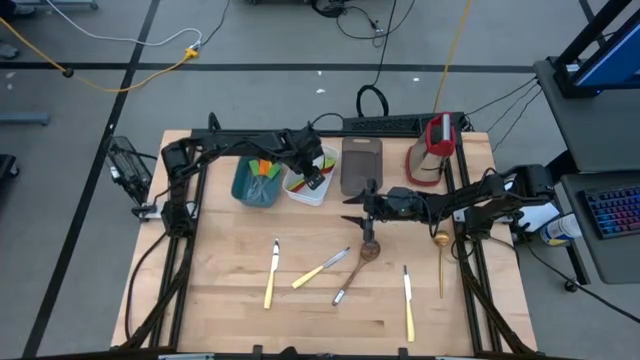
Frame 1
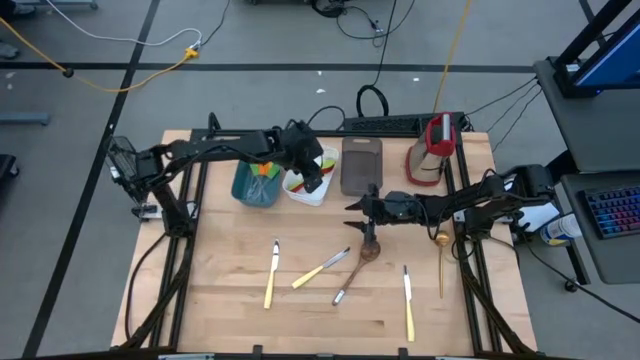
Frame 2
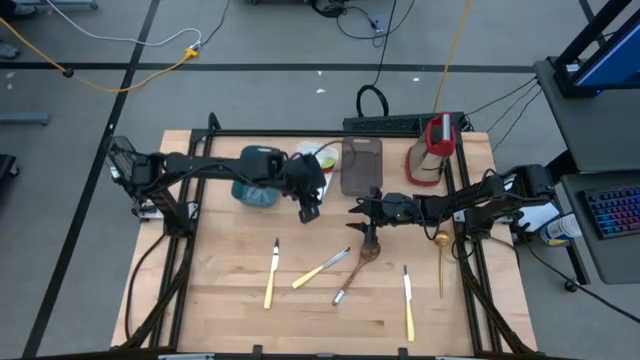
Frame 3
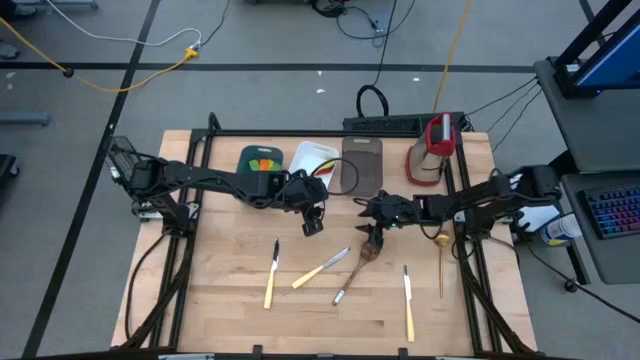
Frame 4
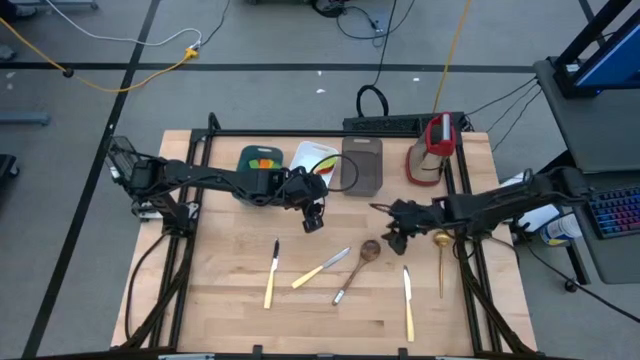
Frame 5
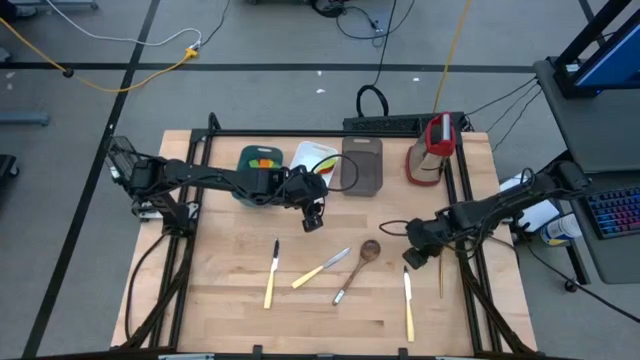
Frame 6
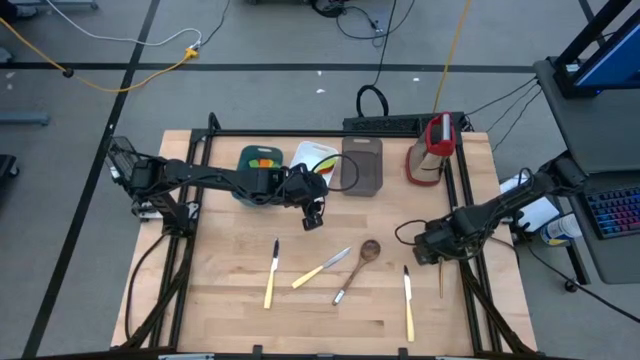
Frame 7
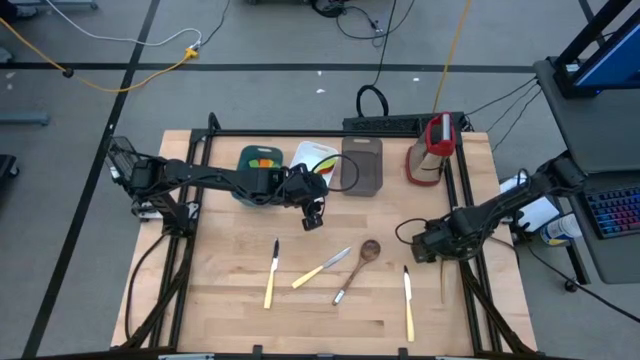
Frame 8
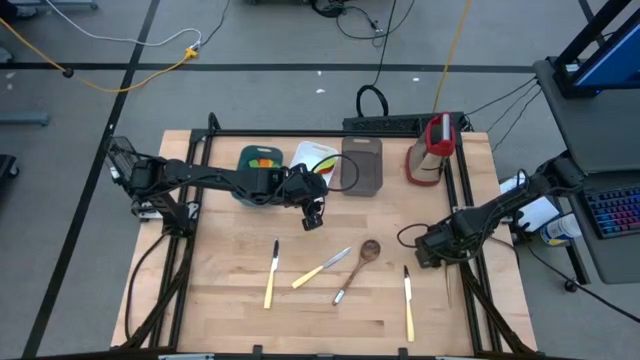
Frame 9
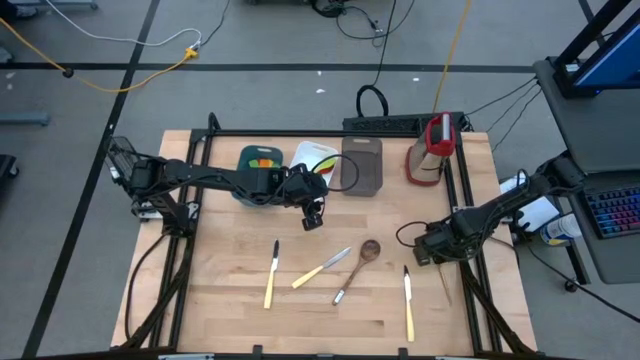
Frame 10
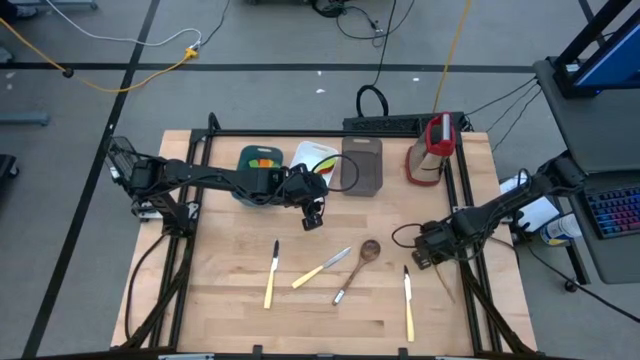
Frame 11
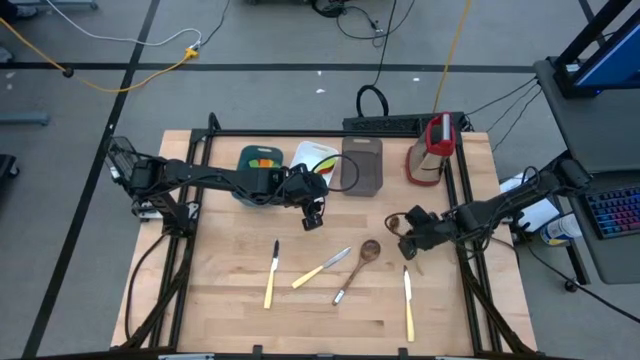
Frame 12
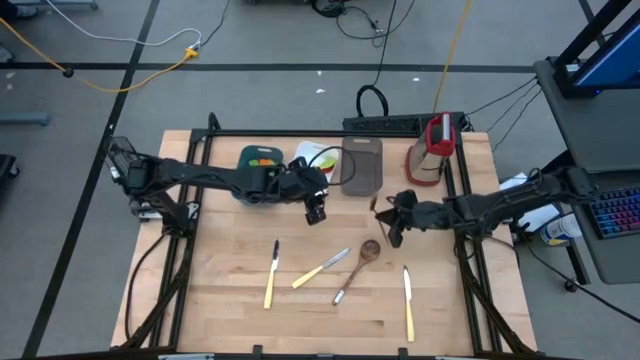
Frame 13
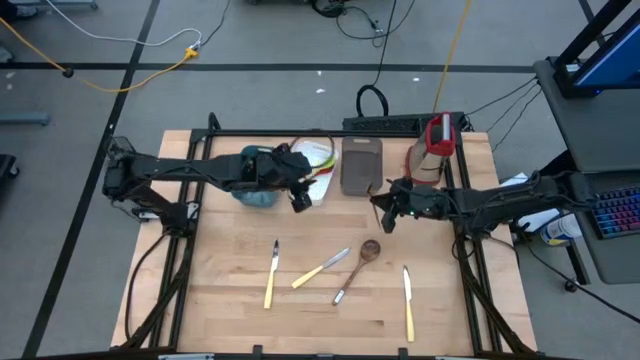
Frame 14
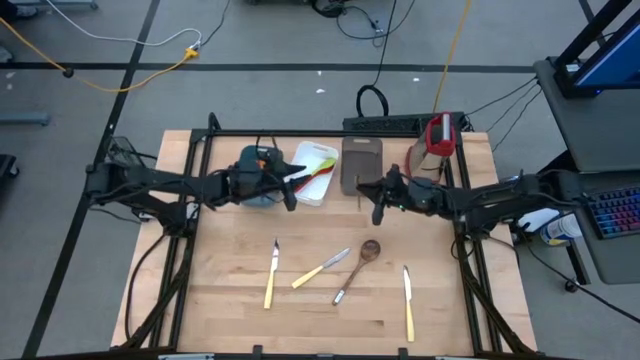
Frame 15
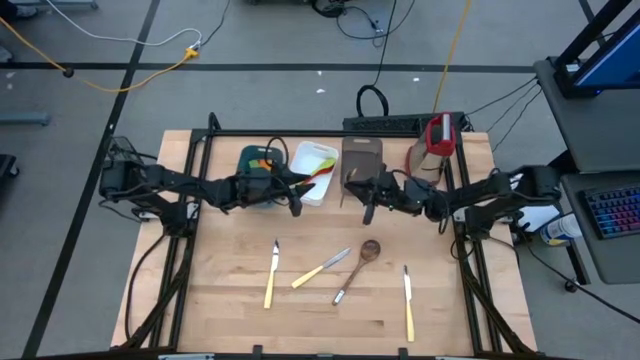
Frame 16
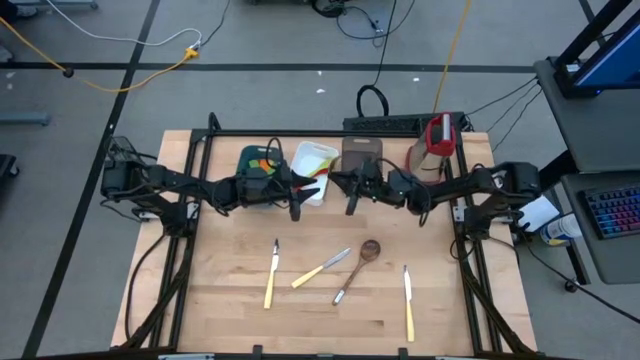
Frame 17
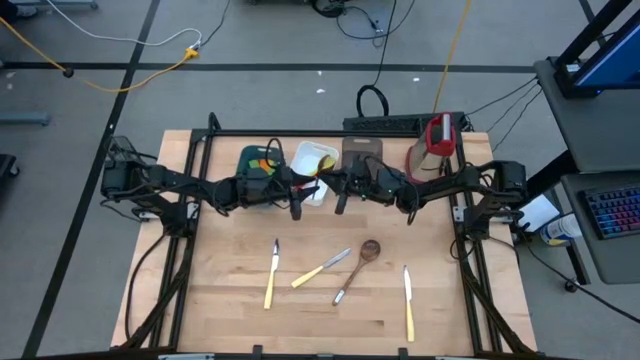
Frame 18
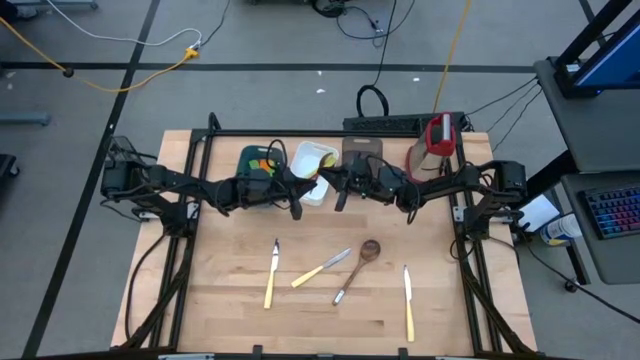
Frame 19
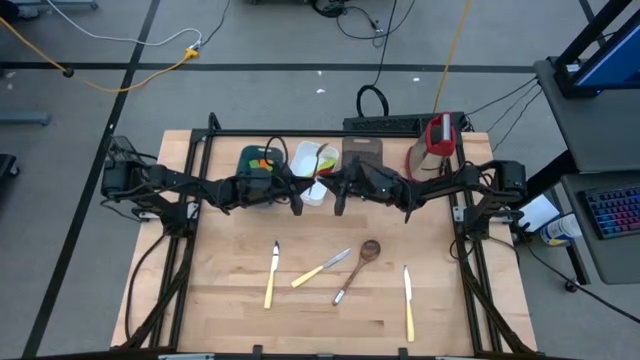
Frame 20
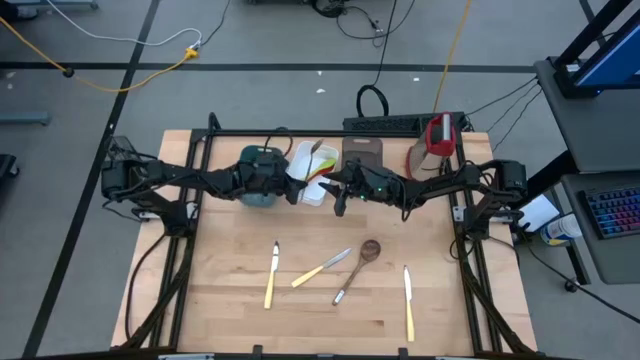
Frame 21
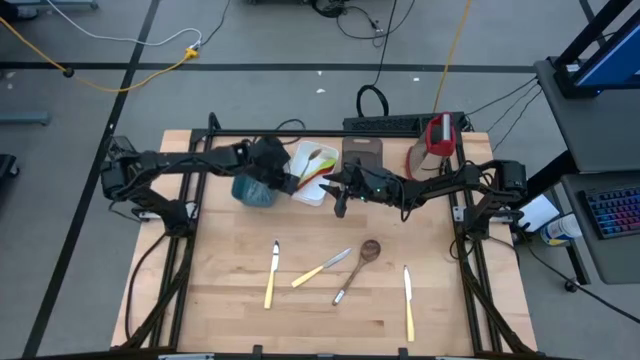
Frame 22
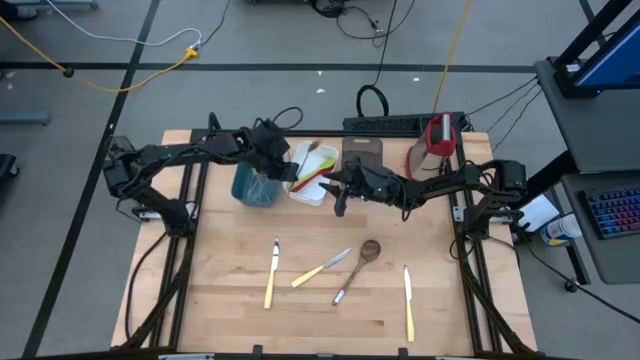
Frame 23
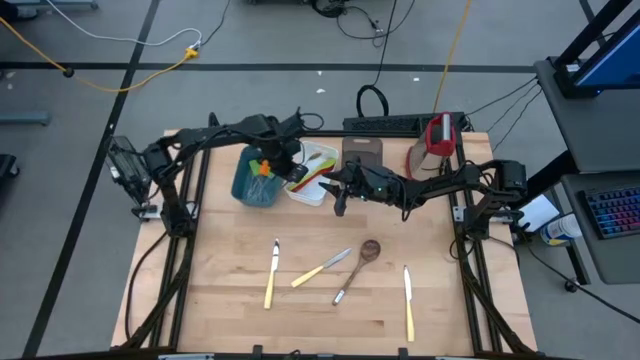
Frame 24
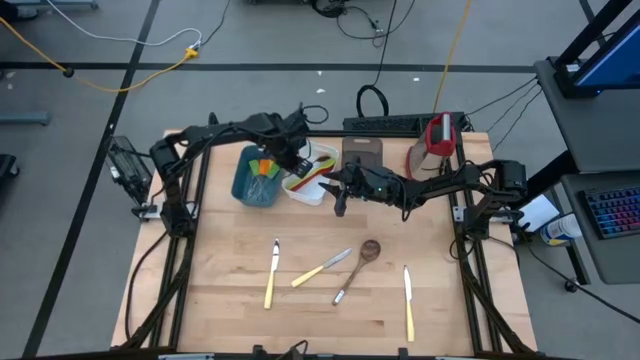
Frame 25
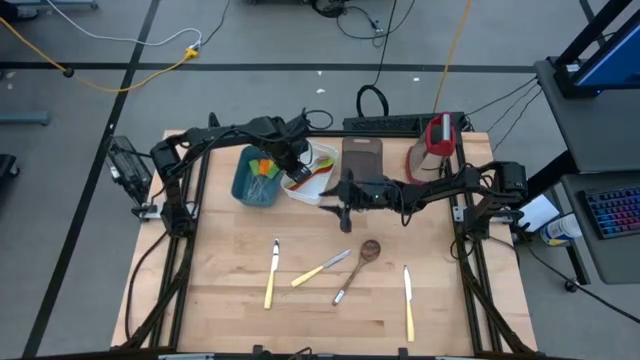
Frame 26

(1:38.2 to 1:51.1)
Task: Pick & Place Kitchen Items
Put the gold serving spoon into the white bin

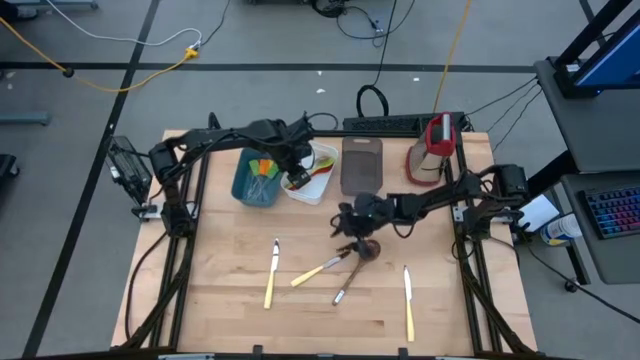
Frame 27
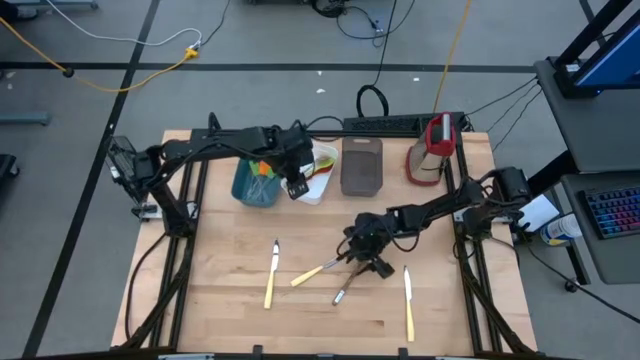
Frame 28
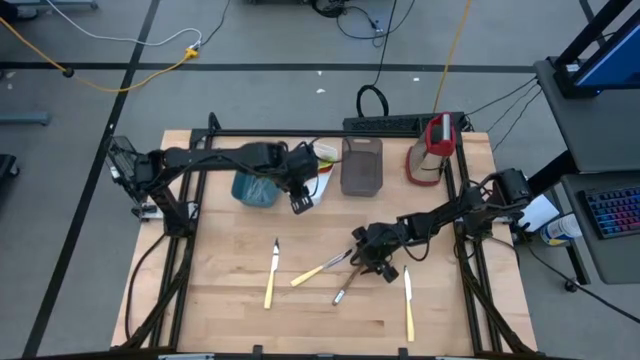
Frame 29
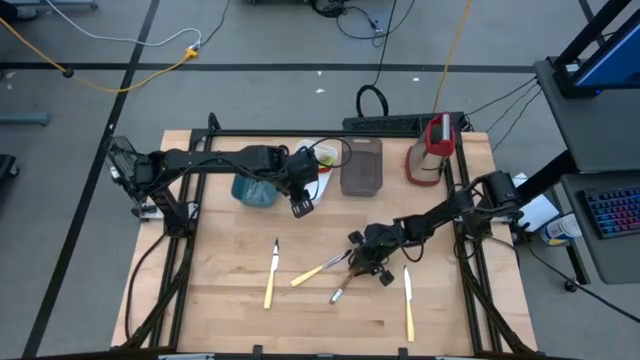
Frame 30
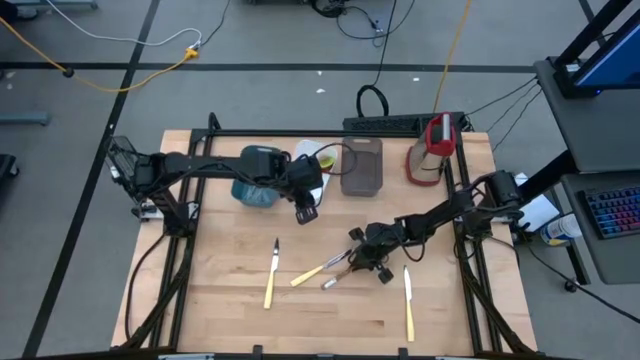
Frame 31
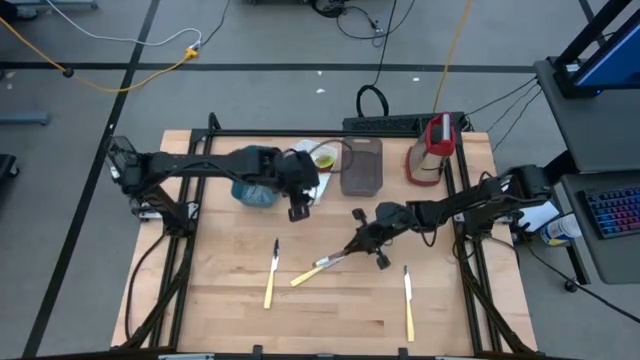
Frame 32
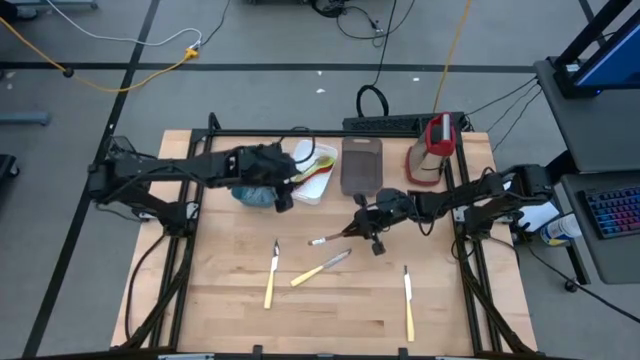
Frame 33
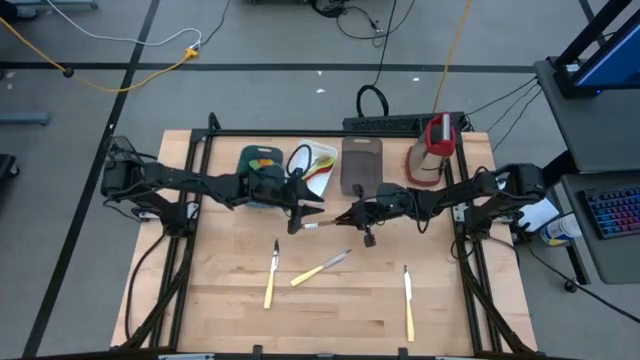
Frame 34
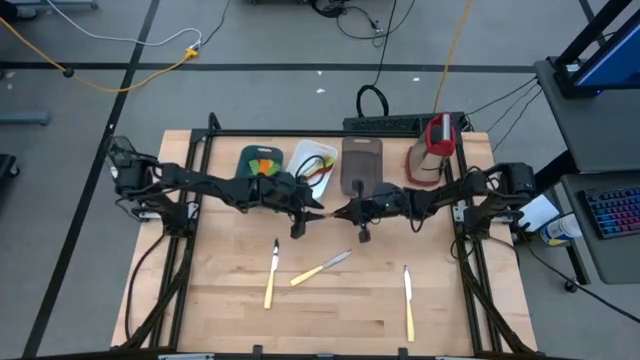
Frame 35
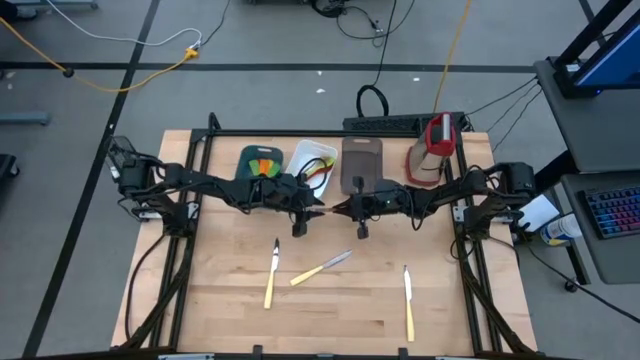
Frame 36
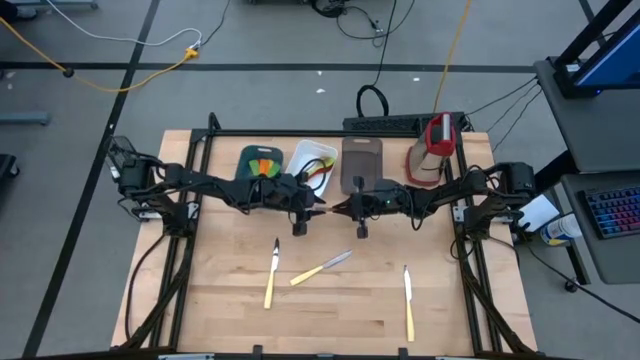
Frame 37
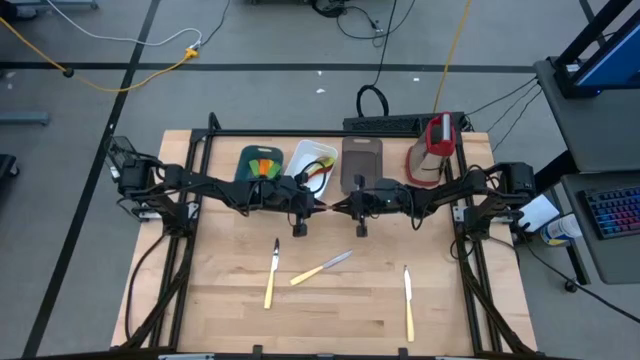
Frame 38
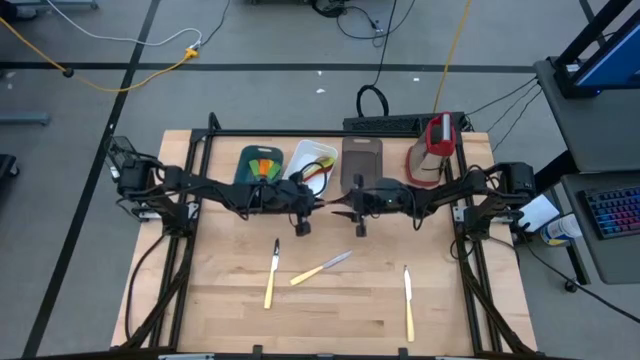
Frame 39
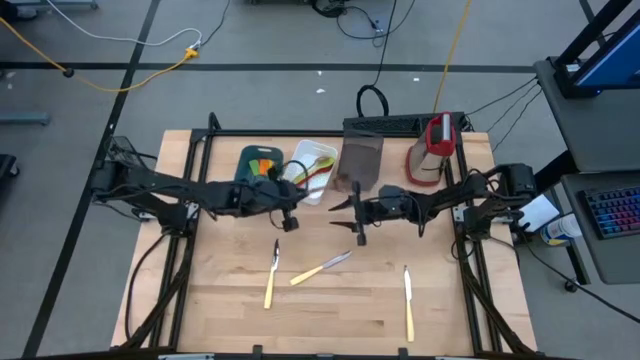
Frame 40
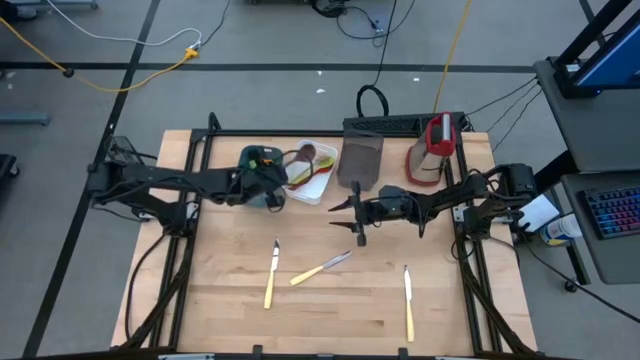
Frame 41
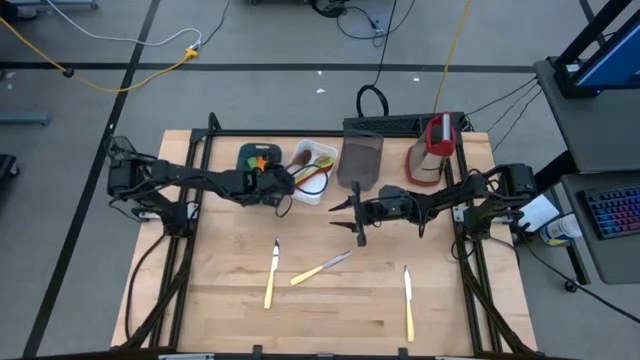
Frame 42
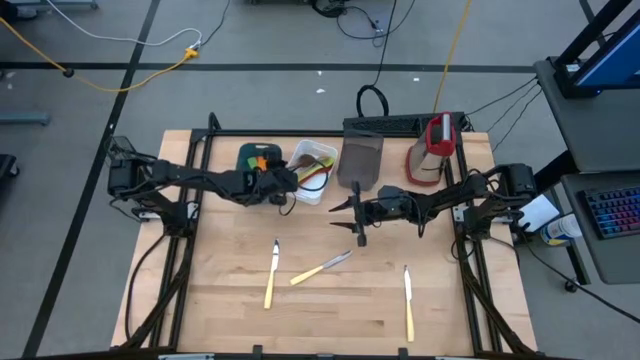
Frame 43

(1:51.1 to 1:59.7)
Put the brown serving spoon into the white bin
